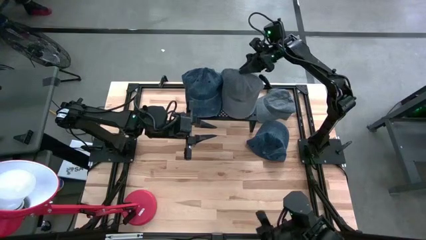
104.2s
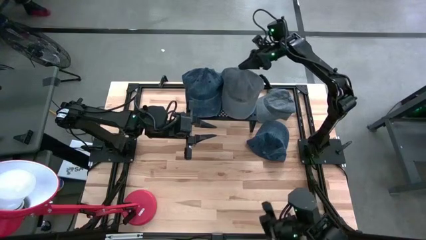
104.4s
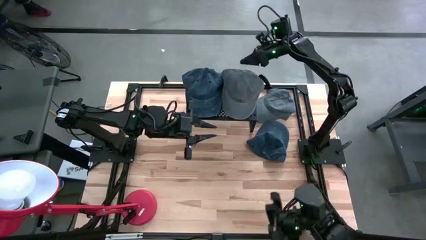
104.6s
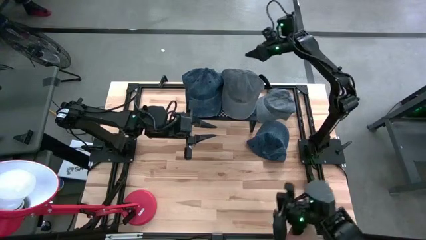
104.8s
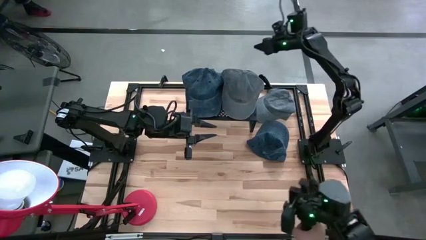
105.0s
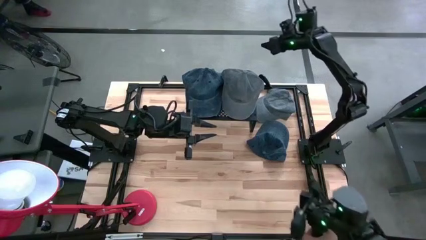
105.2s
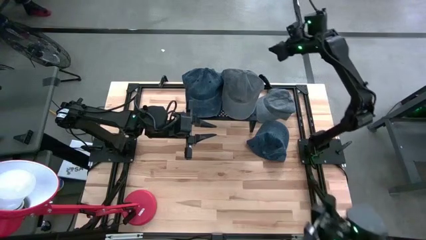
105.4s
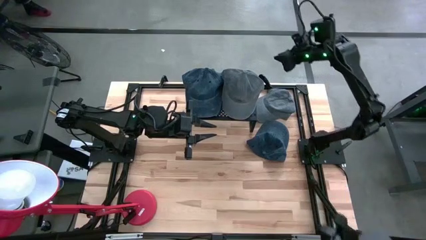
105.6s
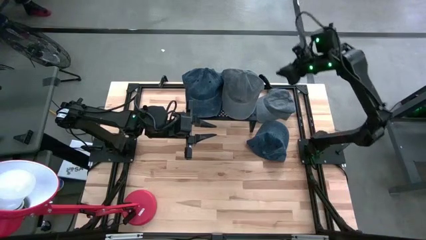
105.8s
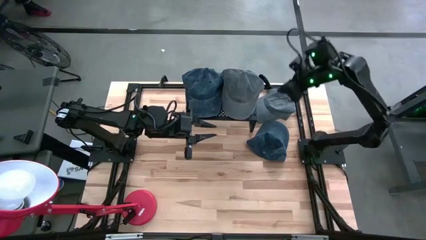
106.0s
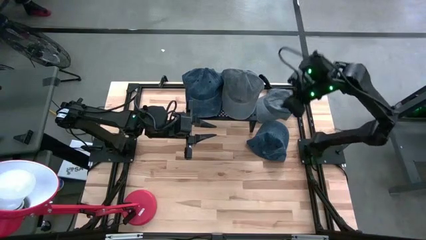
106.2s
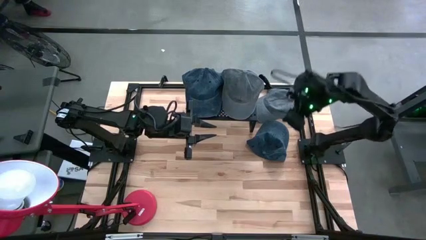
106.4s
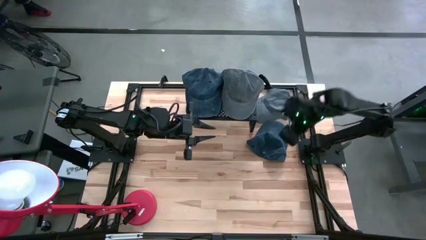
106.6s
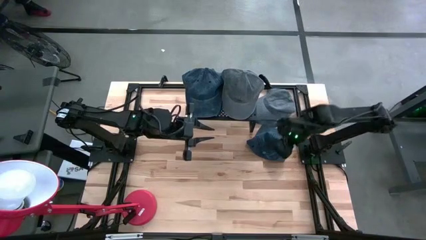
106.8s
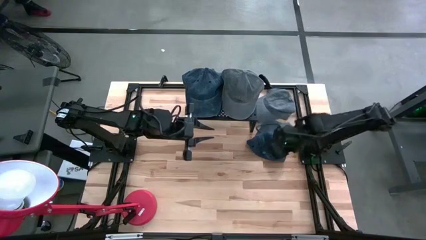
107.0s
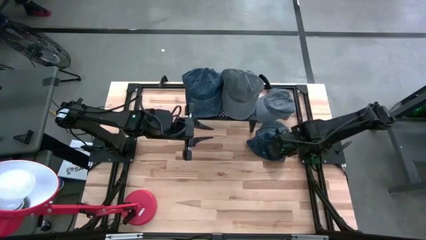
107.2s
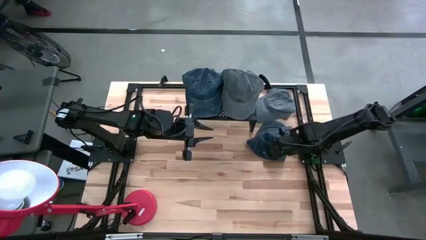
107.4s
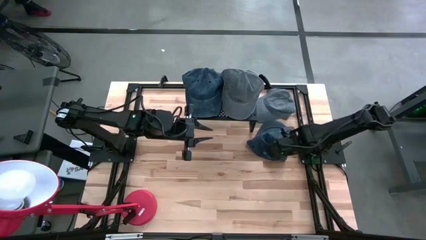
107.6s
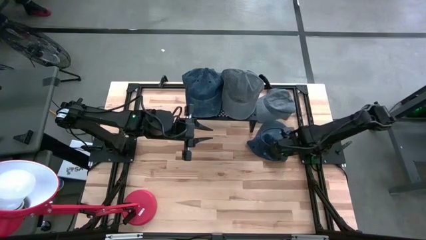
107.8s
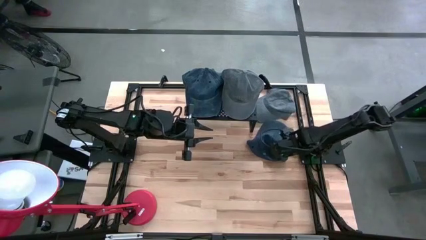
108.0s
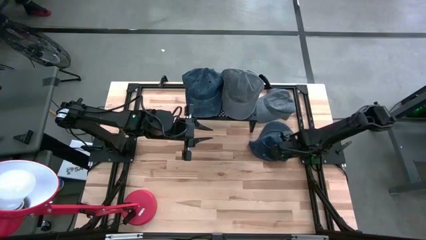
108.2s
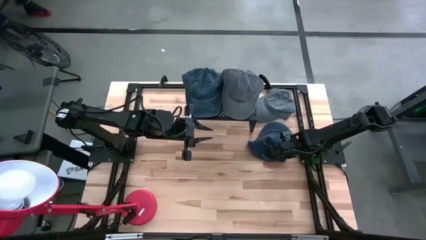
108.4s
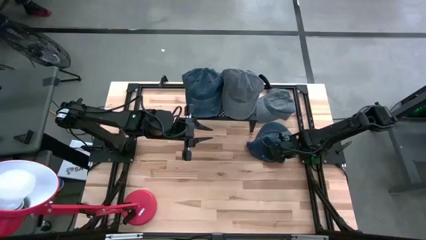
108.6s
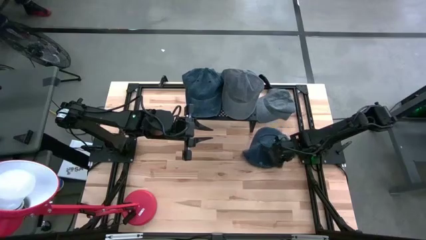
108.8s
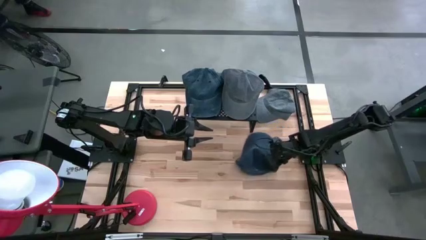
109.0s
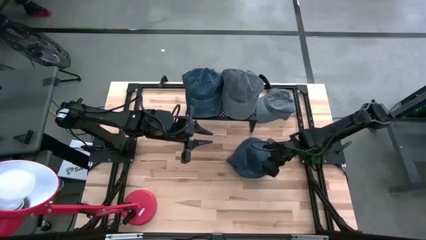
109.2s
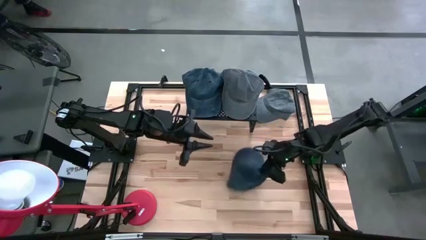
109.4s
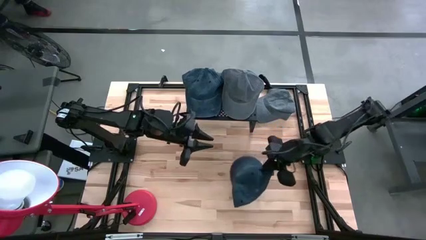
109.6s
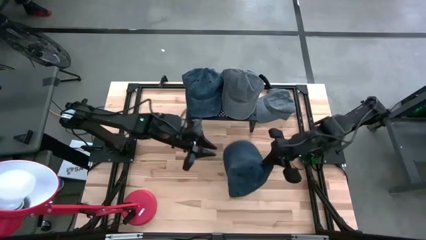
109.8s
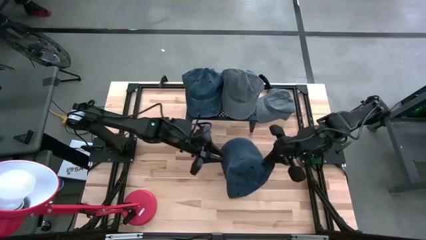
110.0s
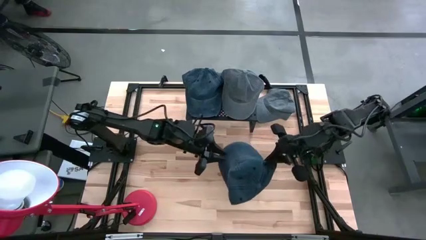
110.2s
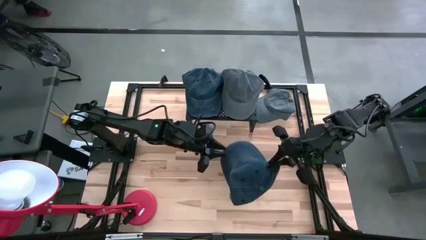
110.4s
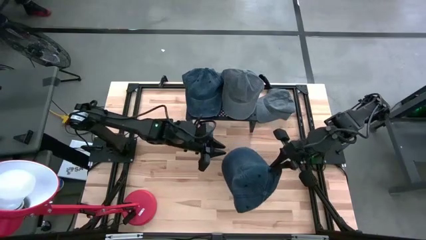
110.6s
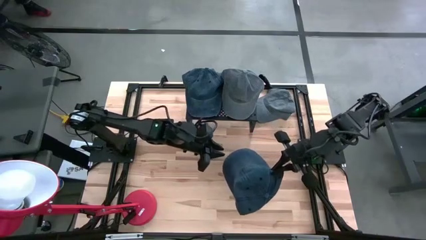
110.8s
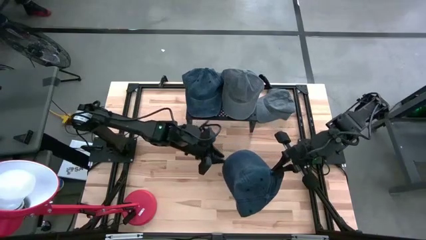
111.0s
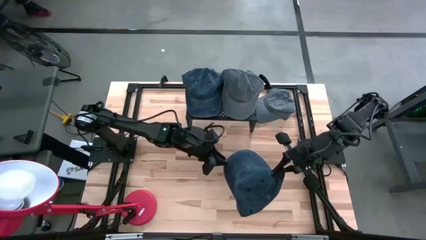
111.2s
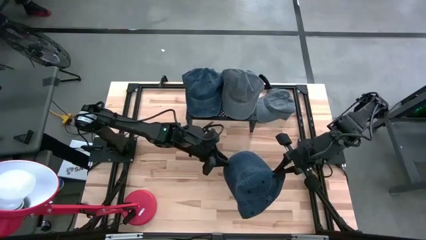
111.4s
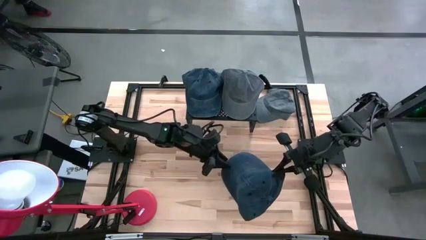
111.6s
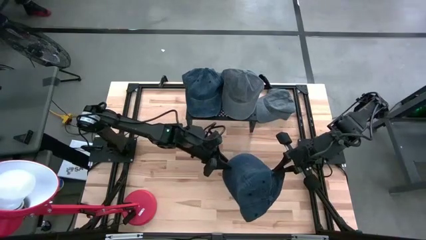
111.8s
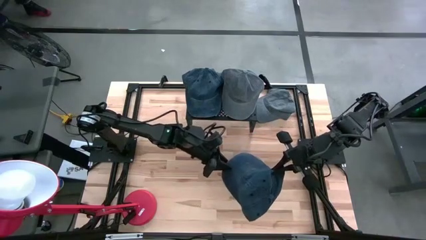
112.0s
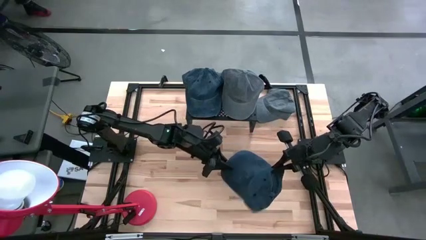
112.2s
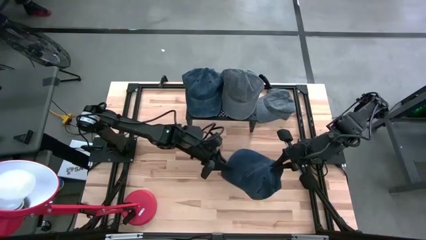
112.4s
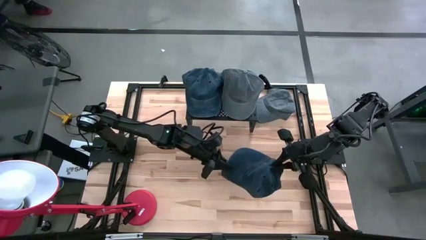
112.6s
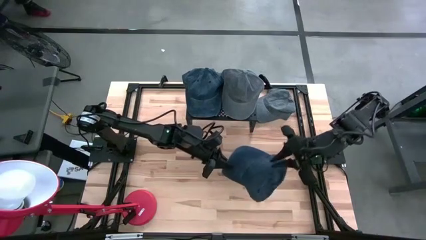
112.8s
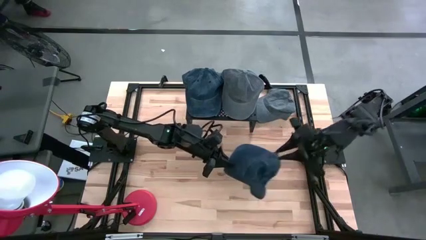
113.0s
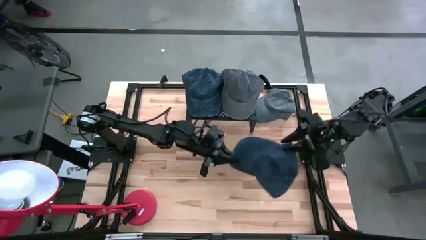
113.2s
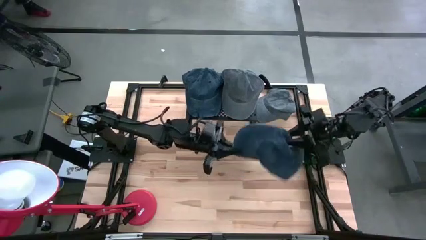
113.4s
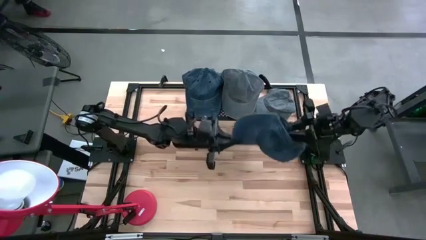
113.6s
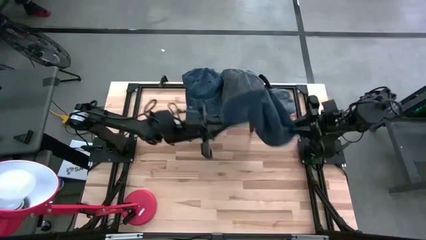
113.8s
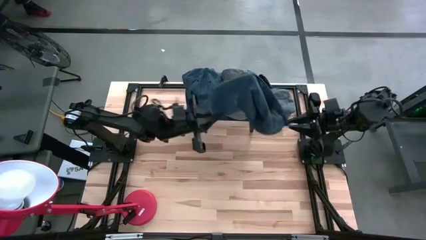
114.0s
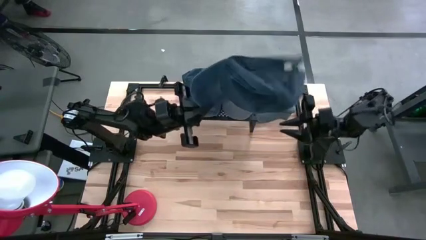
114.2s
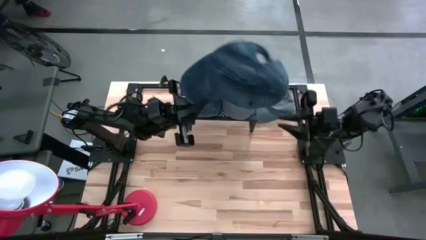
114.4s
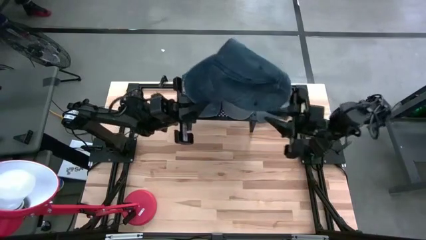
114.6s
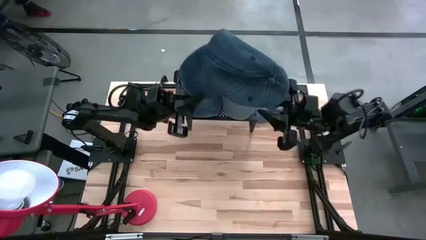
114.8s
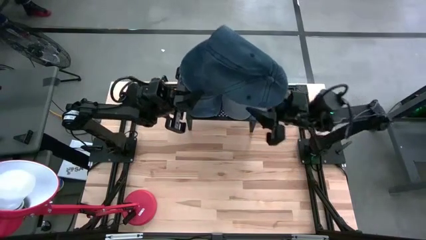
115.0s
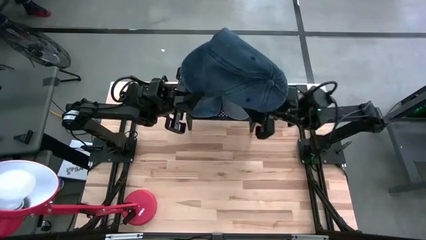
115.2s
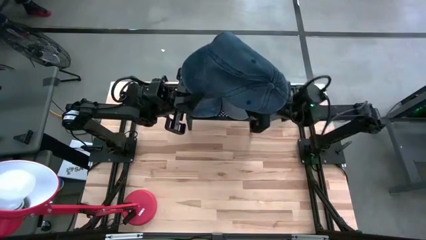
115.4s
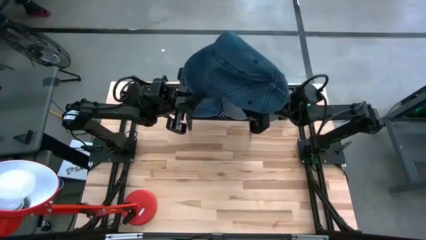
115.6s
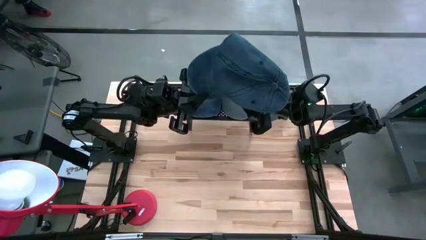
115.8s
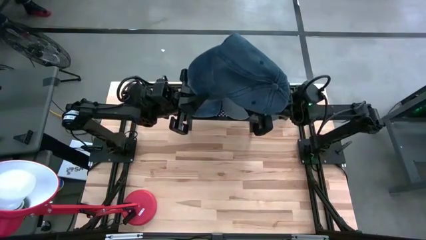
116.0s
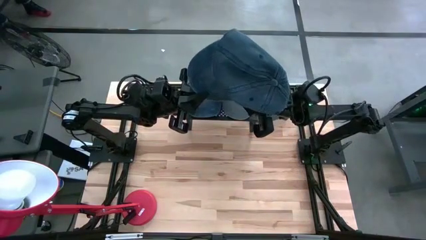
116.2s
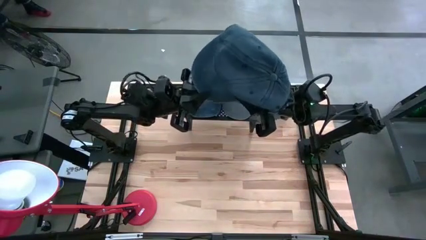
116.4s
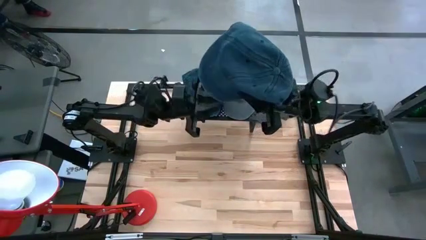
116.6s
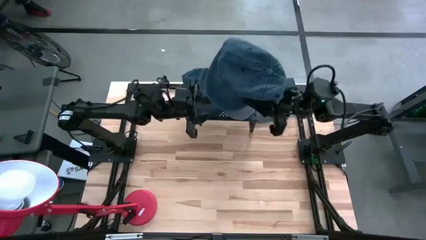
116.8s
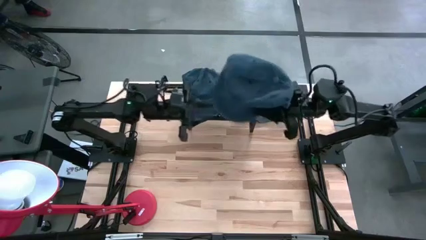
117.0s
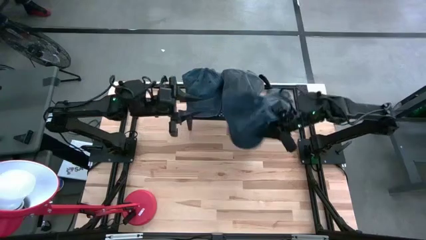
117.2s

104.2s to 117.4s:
Task: Pick & Place hat
Stack the blue cap on top of the stacked blue caps on the shelf

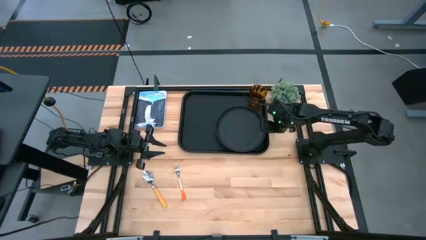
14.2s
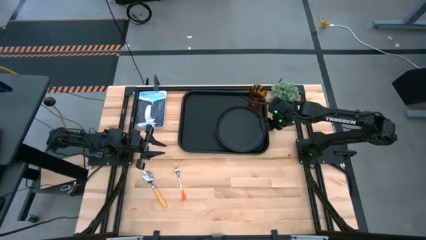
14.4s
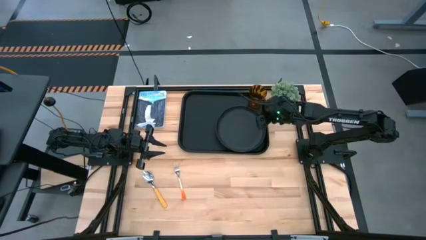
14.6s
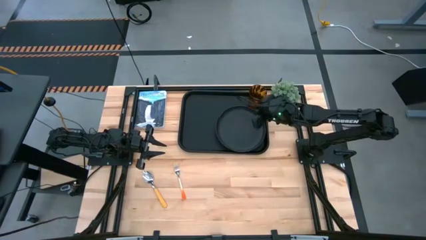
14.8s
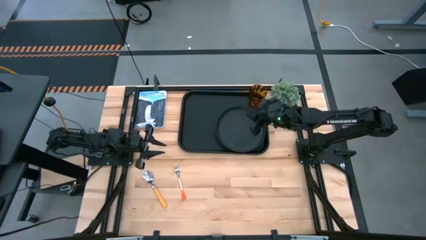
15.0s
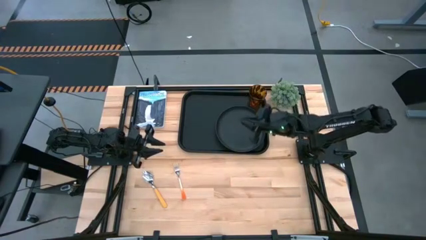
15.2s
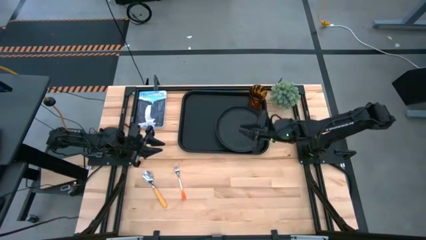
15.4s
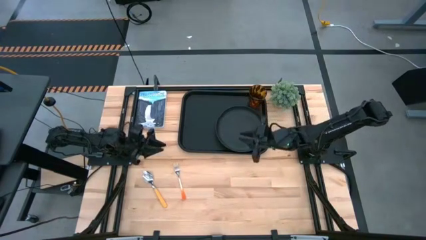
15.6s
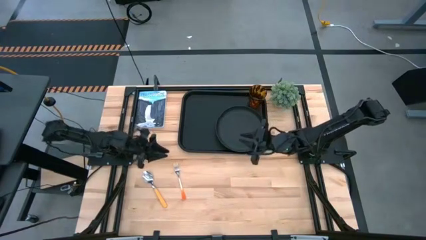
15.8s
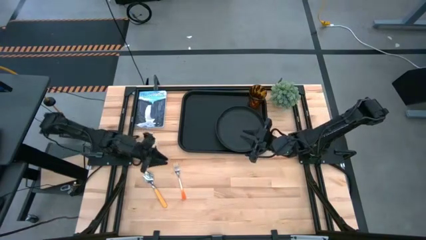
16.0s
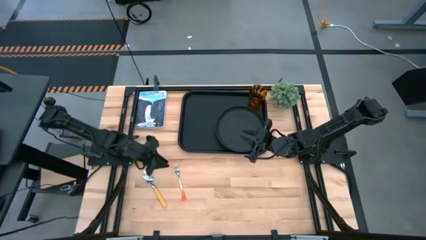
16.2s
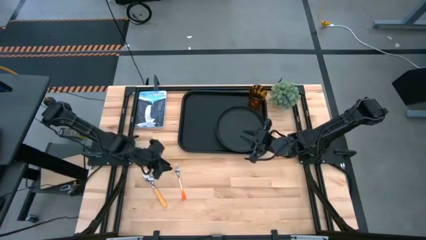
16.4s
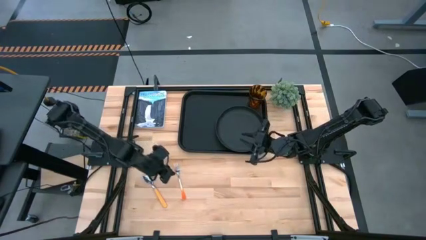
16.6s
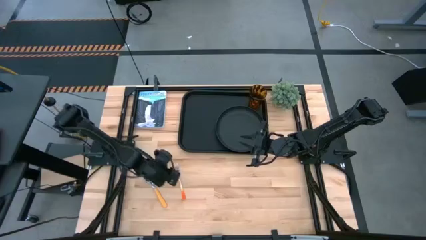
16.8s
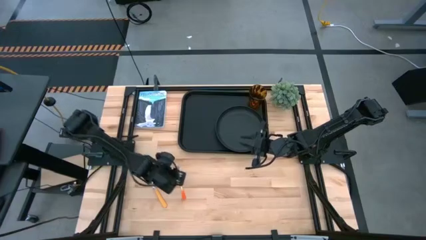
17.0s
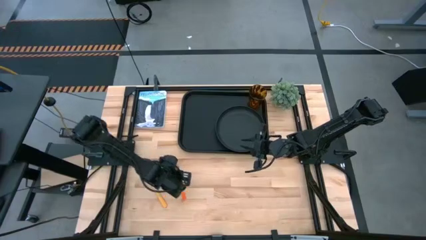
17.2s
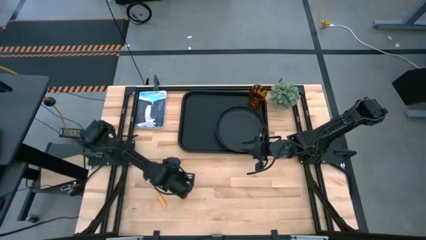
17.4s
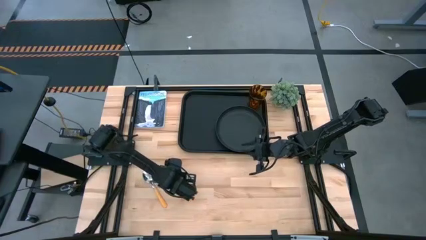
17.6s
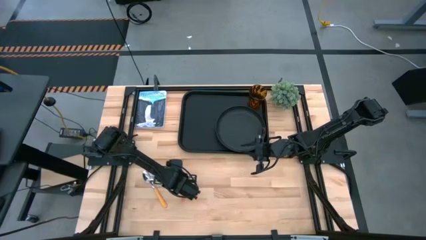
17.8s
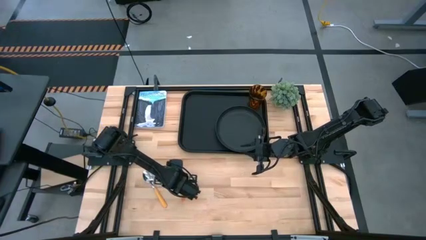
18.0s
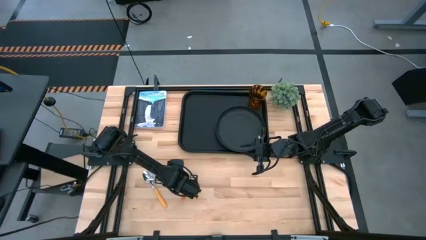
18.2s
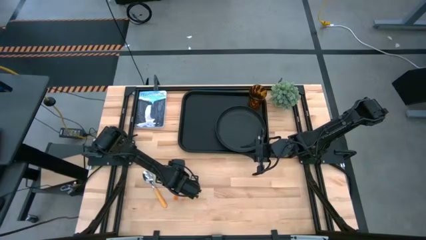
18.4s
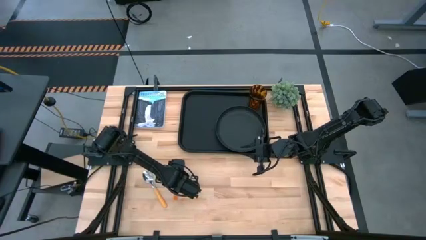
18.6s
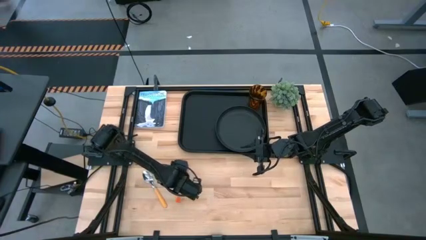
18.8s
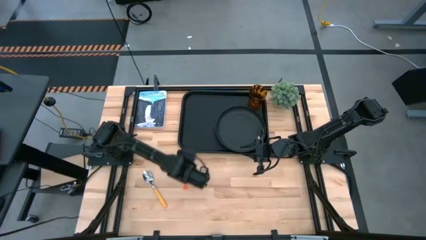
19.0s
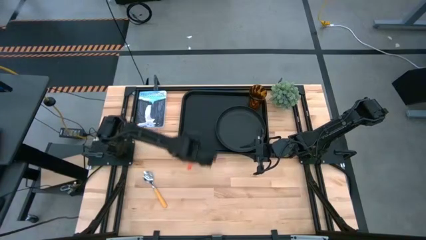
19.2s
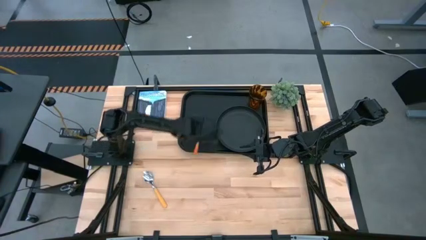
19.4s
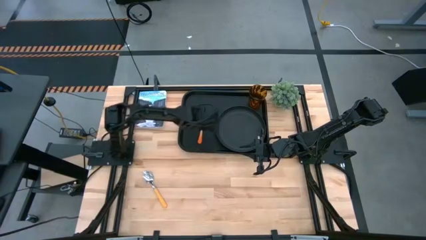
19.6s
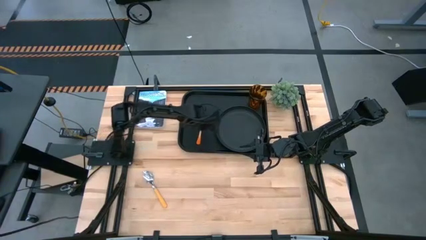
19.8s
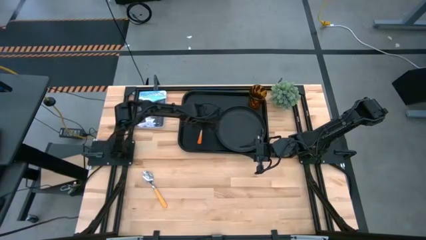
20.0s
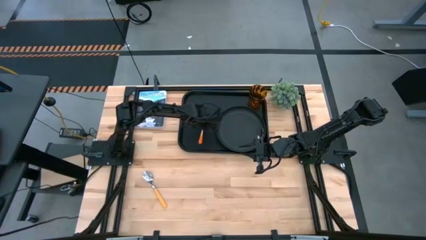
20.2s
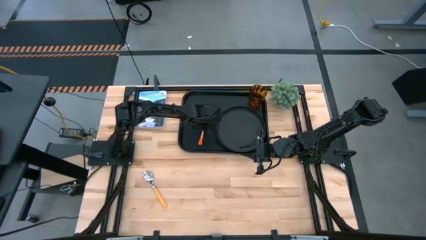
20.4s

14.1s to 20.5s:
Task: Pick and place plate/cup/fork/spoon on tray
Put the orange fork on the black serving tray to the left of the black plate
